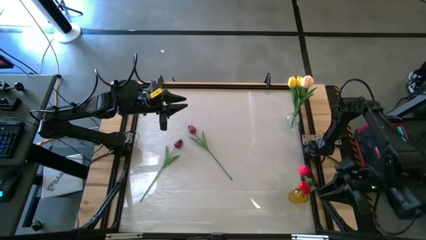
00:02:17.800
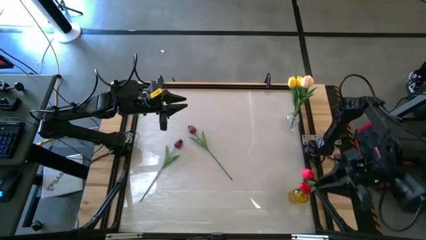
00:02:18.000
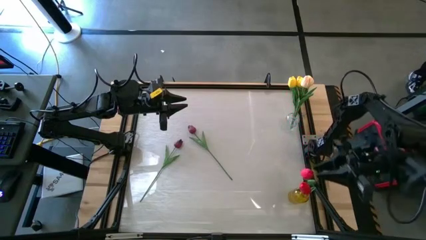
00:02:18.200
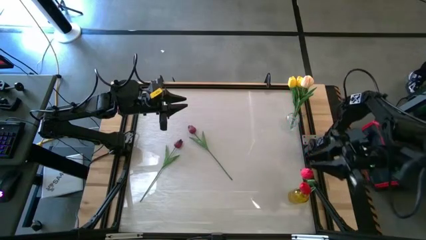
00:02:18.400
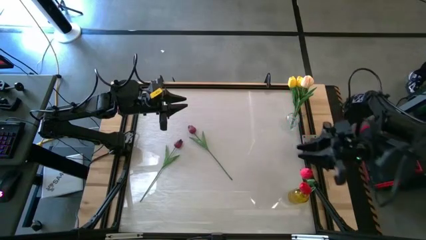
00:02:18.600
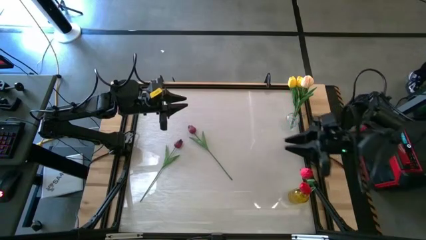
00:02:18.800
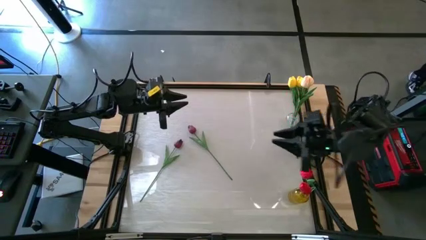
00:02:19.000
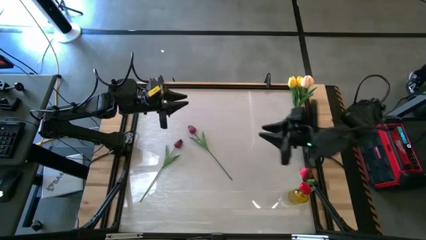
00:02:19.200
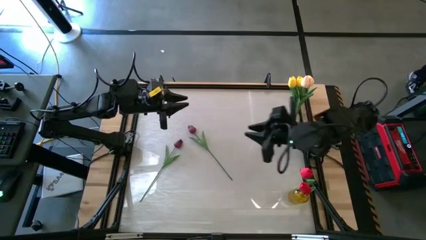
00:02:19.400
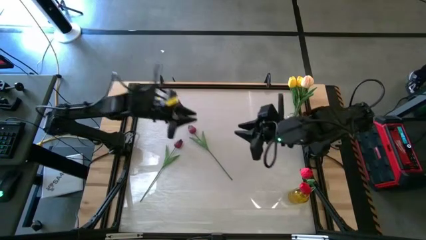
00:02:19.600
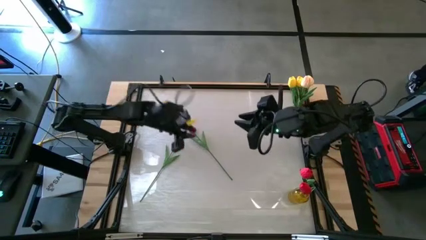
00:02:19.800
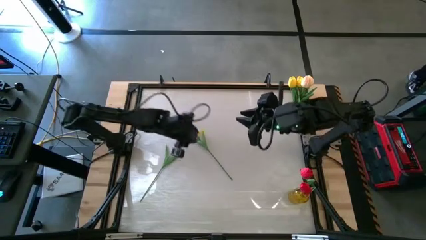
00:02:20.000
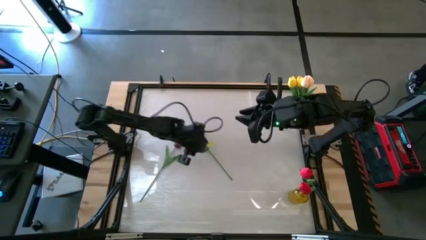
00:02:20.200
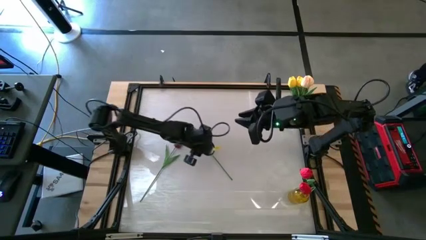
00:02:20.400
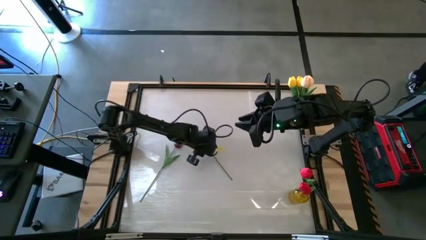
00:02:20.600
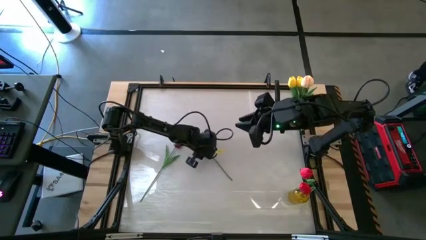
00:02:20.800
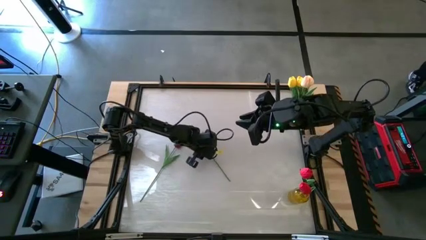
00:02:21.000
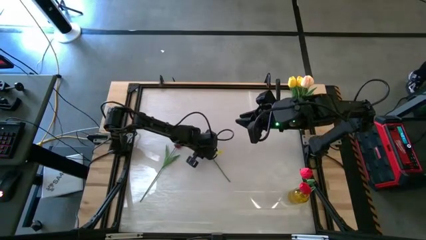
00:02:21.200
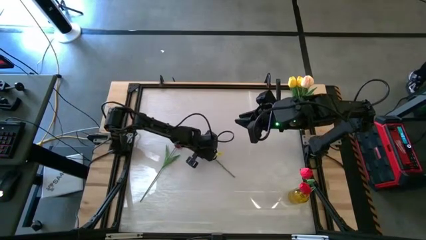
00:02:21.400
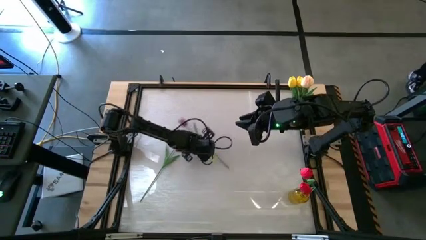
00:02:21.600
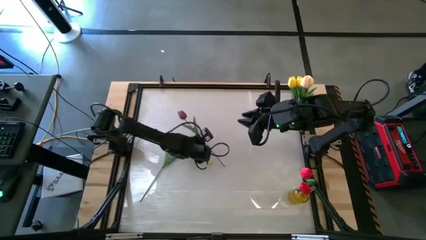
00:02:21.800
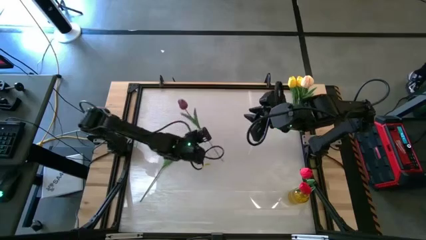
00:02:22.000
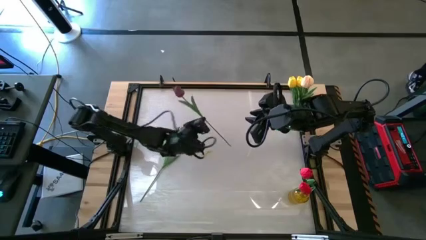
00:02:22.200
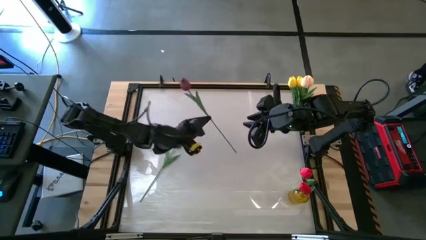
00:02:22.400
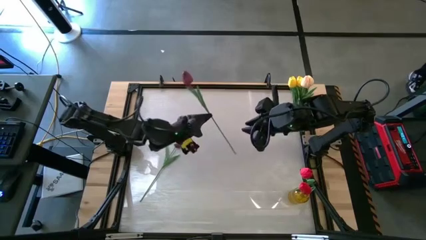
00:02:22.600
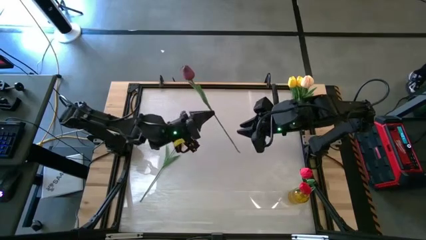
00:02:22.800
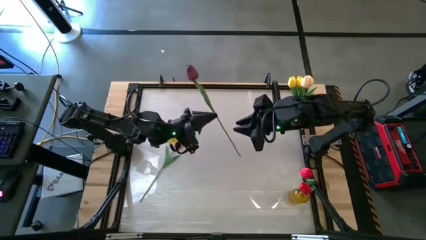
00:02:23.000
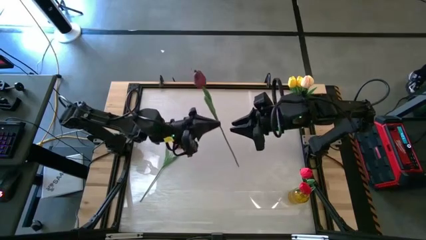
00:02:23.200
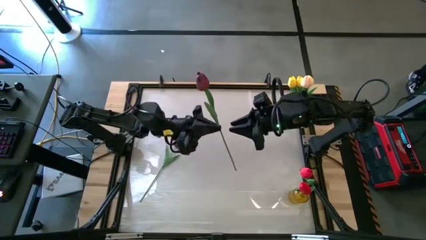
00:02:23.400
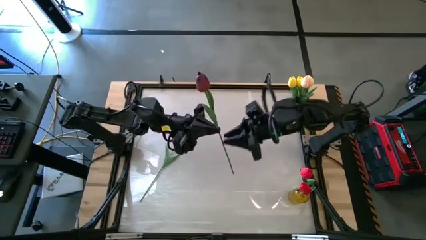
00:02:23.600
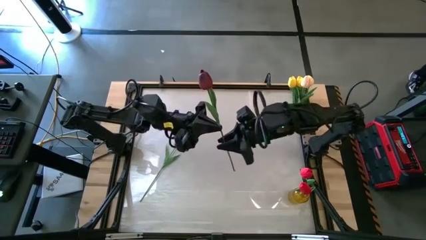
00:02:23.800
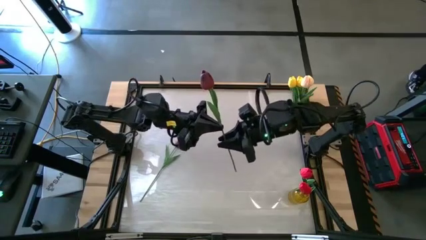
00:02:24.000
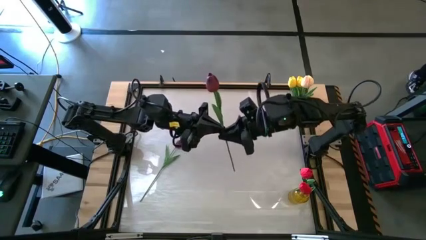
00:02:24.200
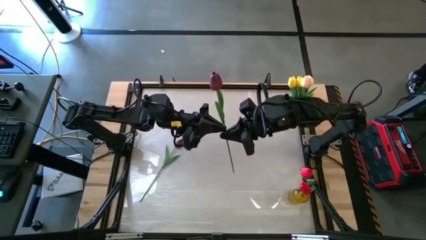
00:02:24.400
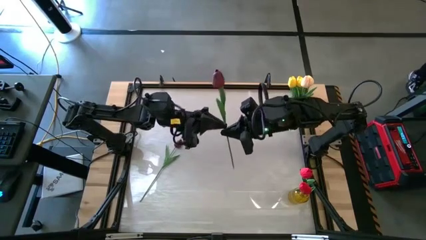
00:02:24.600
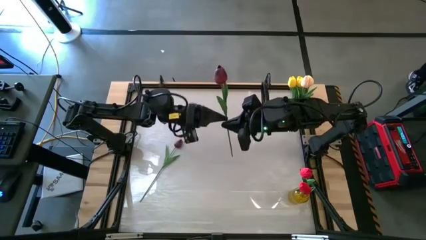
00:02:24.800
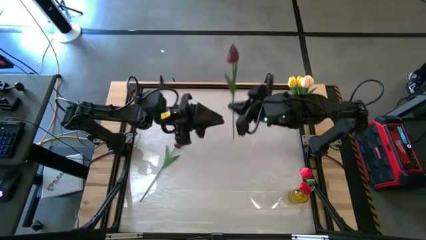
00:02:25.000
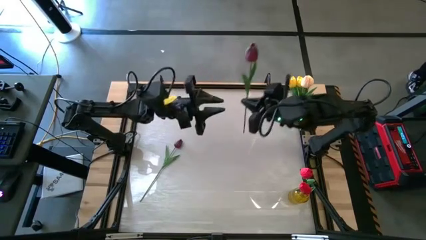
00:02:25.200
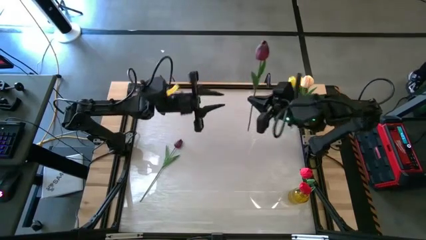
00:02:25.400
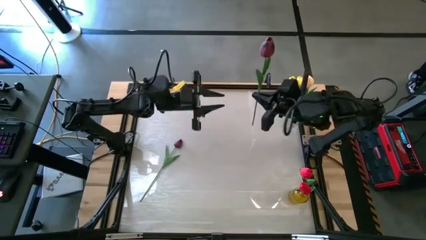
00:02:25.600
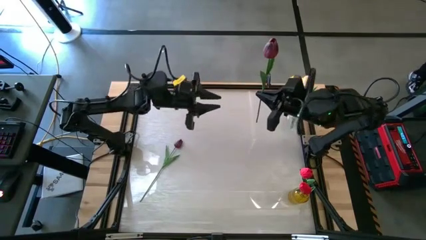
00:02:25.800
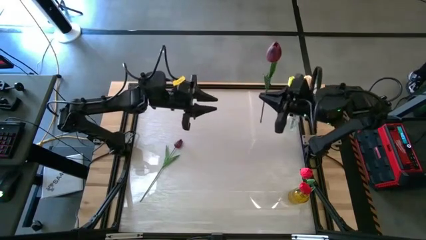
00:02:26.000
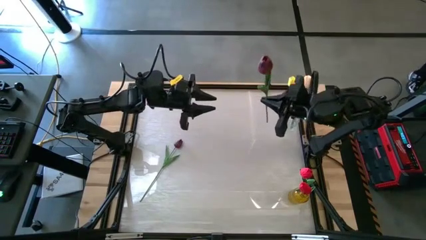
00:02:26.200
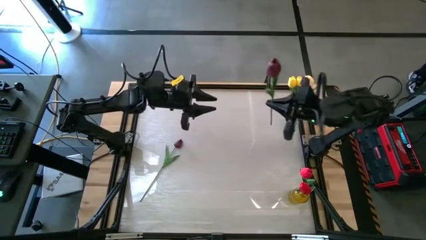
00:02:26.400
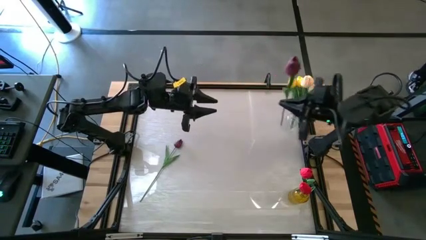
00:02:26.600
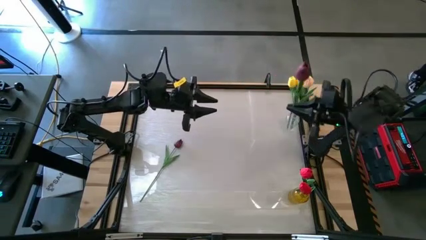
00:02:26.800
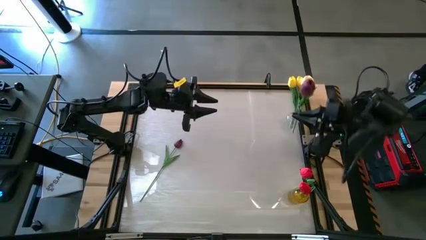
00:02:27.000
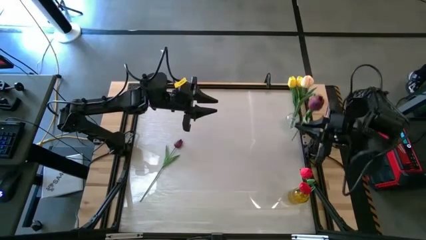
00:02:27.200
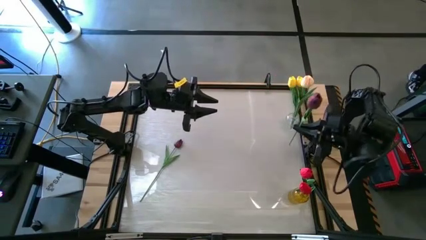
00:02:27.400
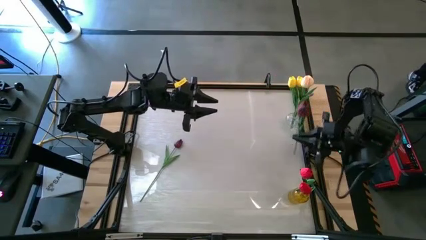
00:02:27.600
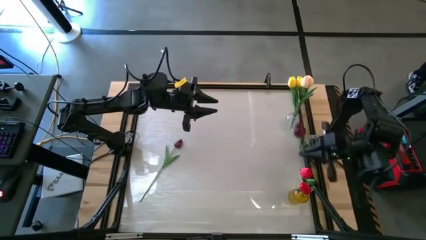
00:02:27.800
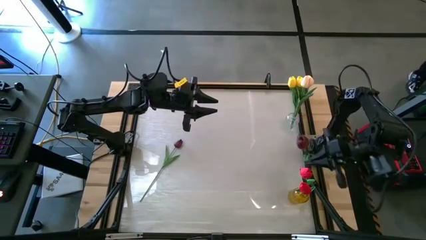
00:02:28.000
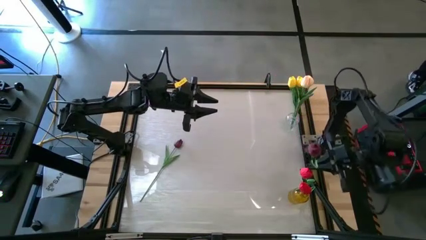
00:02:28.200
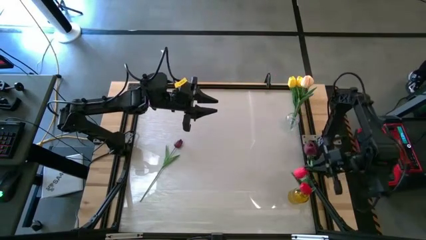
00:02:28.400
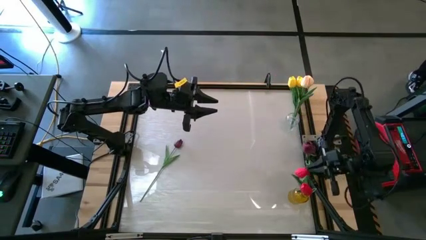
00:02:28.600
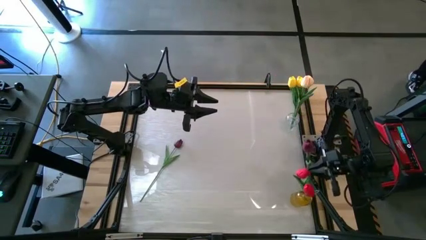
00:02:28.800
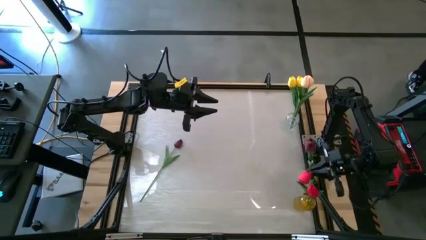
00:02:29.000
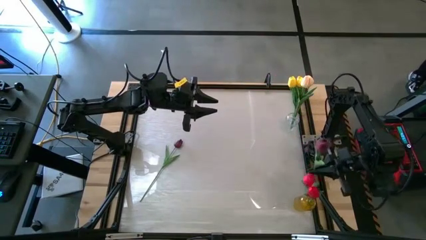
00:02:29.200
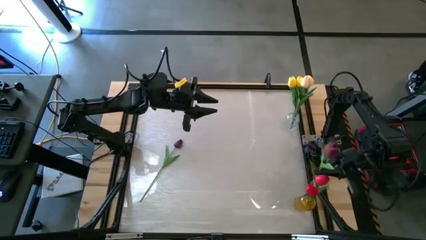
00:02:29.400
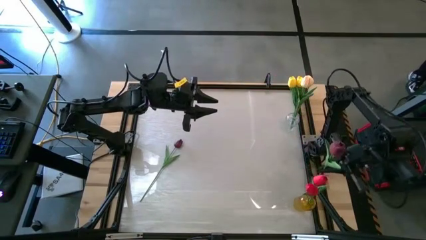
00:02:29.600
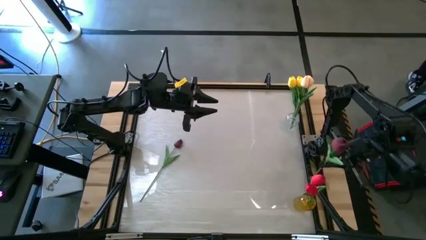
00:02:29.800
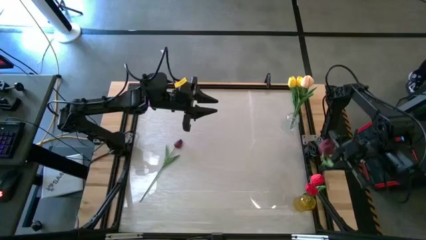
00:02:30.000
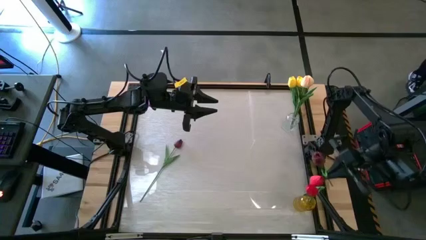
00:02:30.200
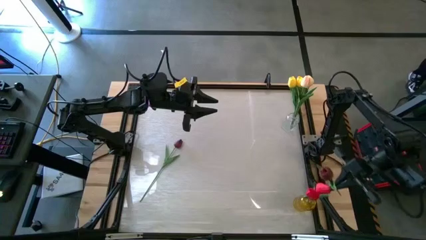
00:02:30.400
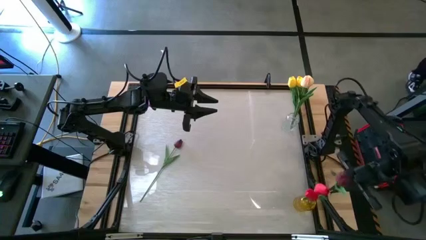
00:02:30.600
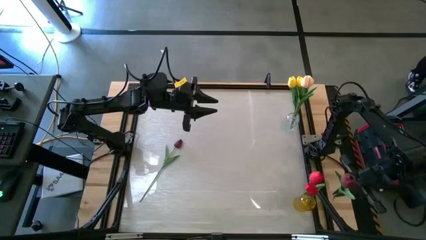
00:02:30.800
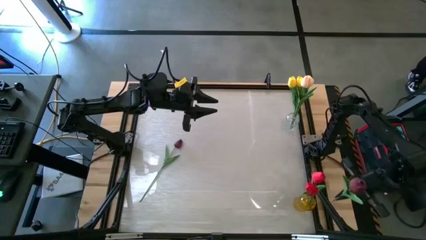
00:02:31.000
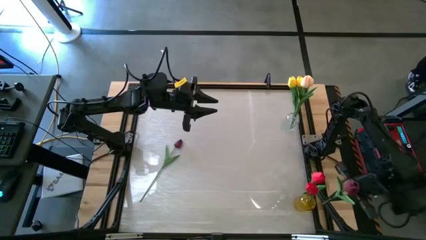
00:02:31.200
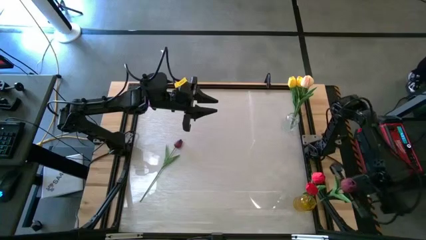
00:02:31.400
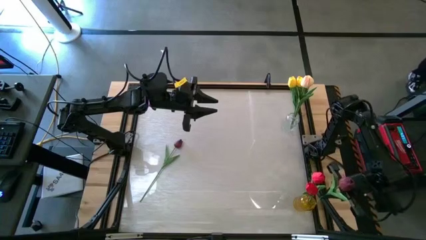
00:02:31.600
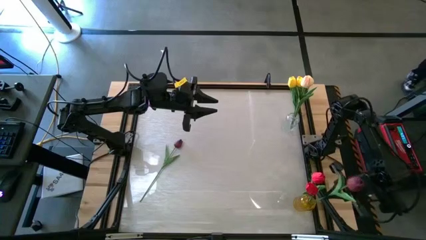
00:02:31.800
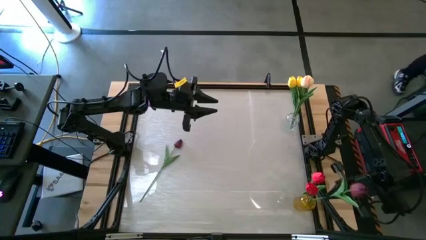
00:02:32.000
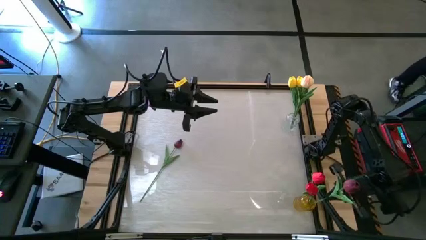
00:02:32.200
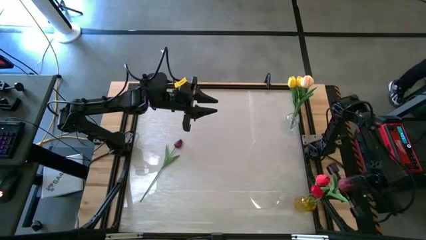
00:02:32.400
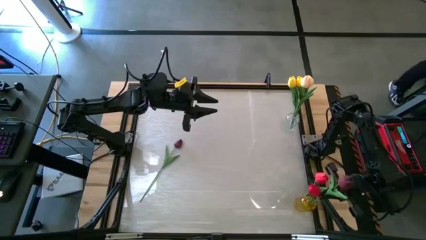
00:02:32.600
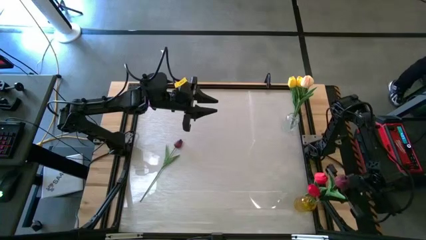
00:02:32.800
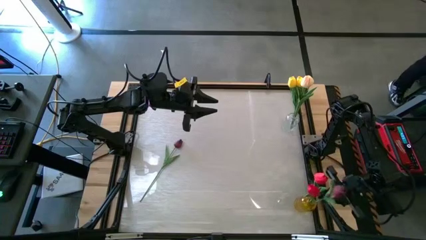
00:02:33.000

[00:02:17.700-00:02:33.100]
Task: Sort flowers into vase by color
Put the right dark red tulip into the yellow vase
